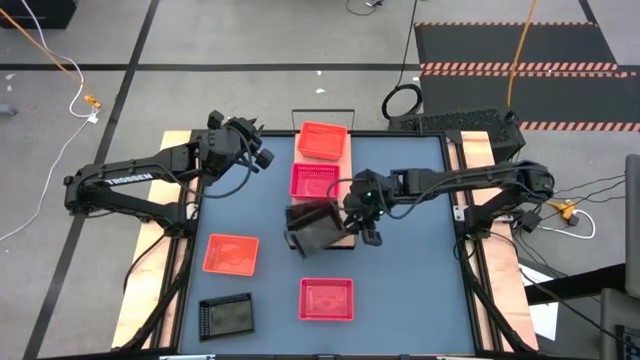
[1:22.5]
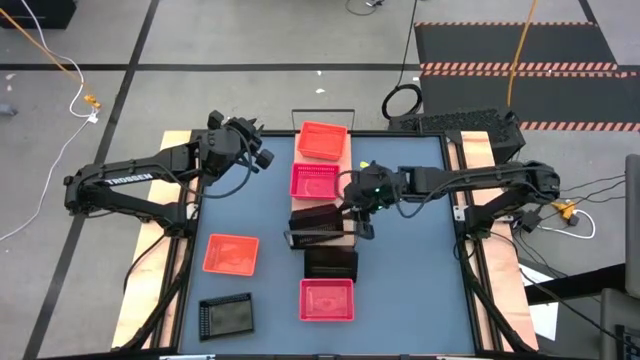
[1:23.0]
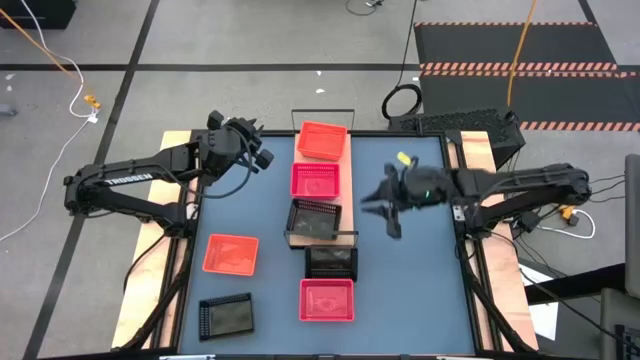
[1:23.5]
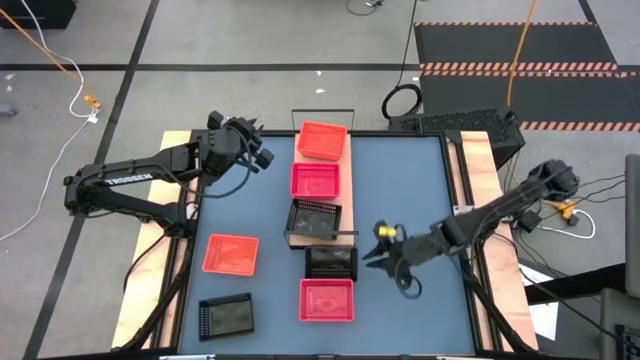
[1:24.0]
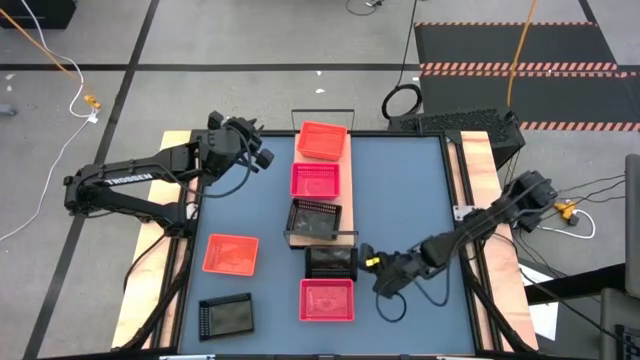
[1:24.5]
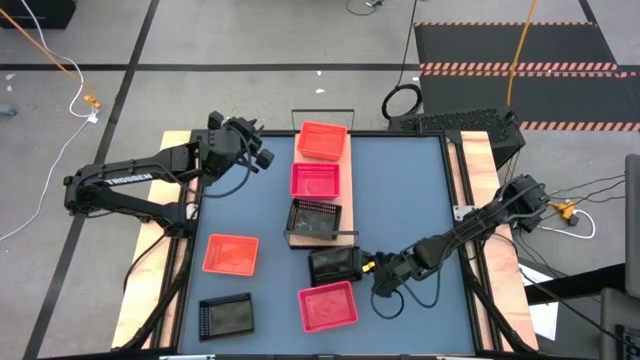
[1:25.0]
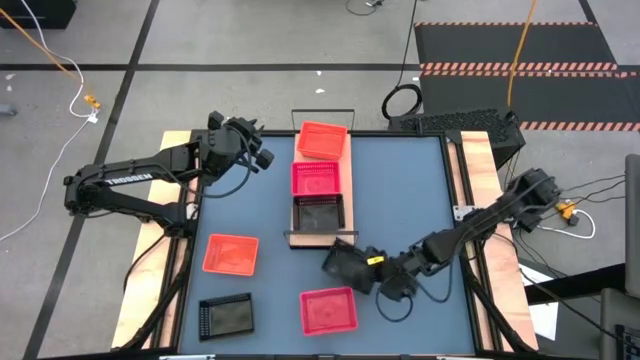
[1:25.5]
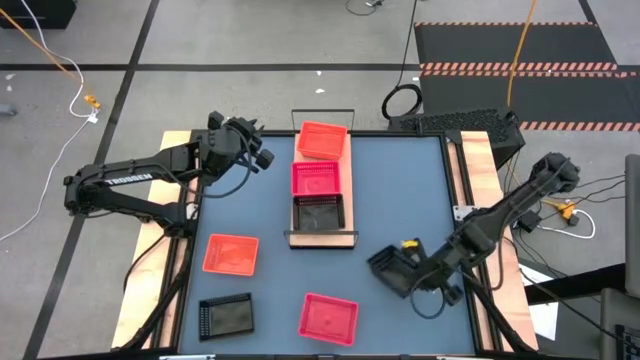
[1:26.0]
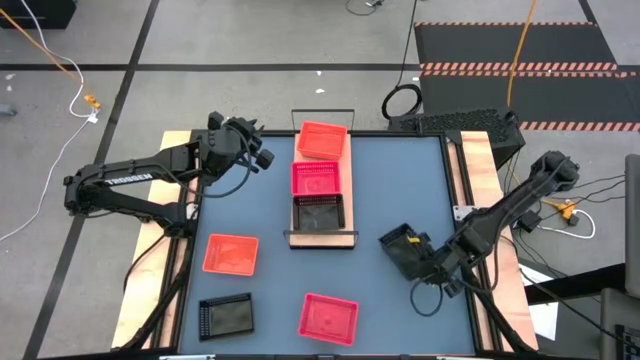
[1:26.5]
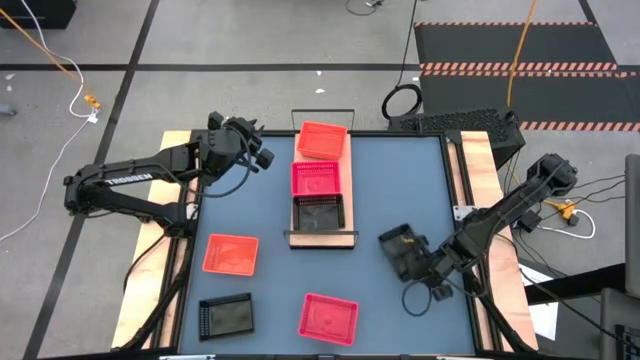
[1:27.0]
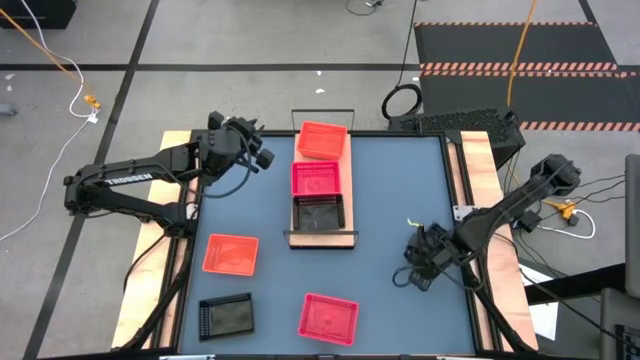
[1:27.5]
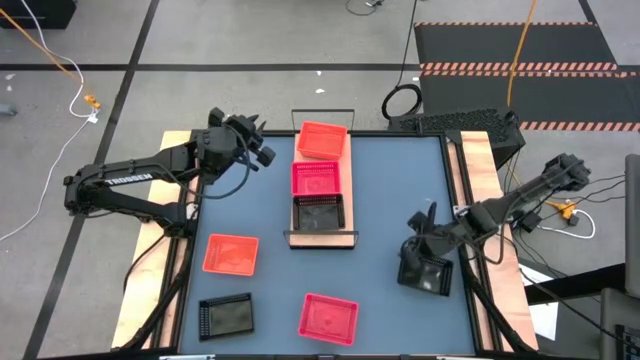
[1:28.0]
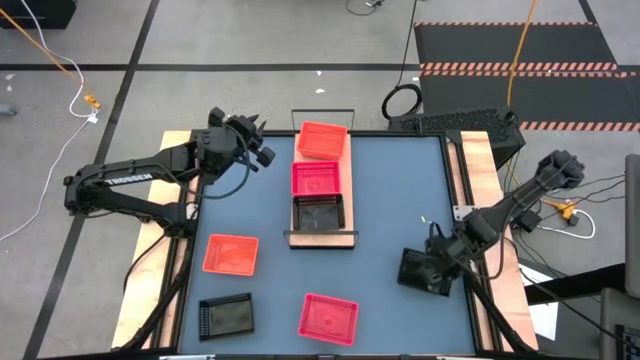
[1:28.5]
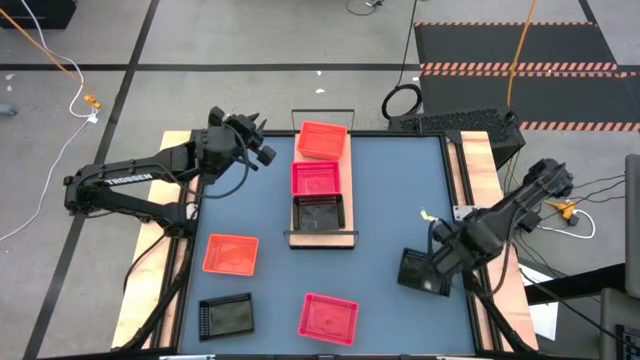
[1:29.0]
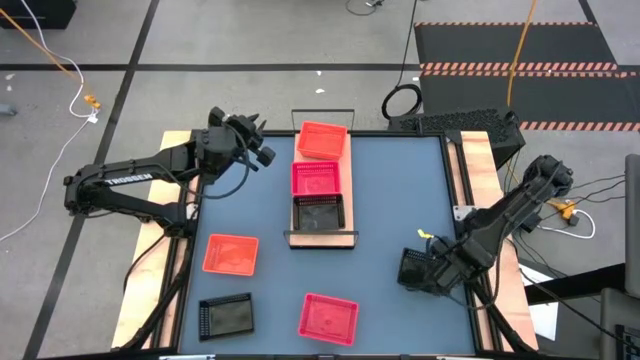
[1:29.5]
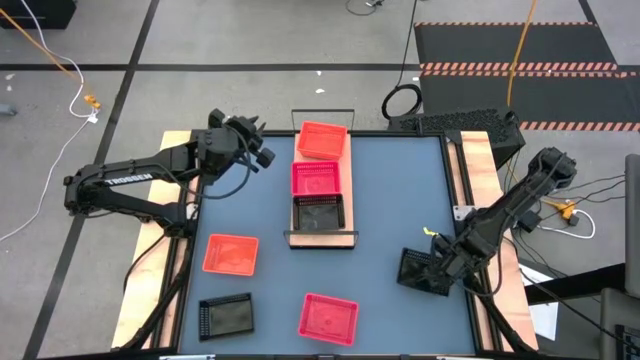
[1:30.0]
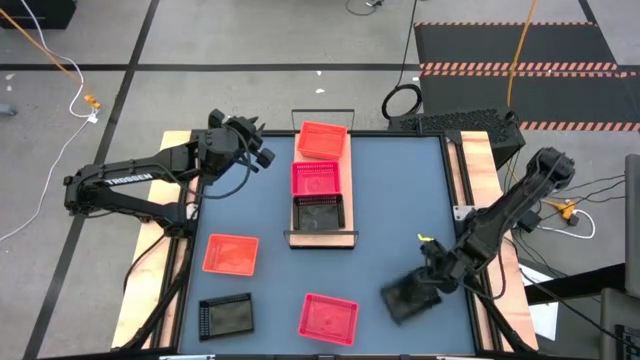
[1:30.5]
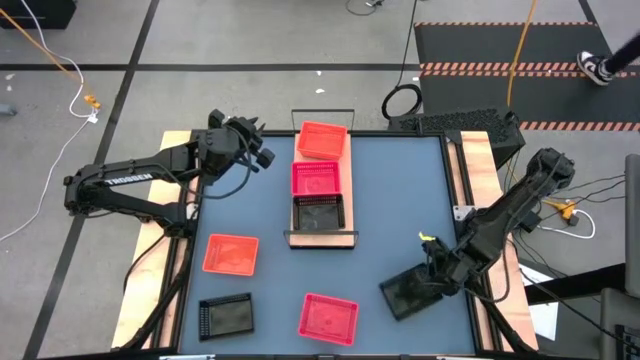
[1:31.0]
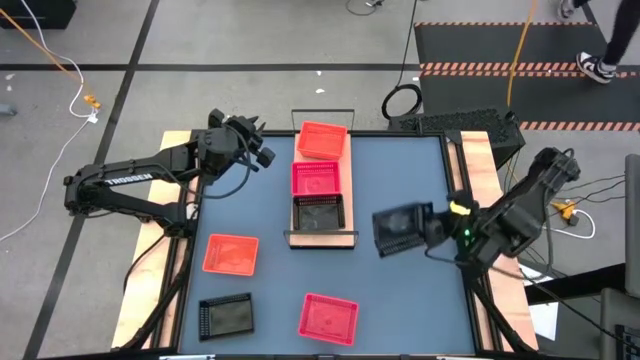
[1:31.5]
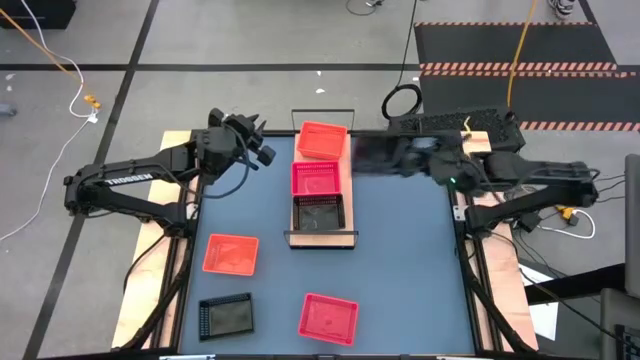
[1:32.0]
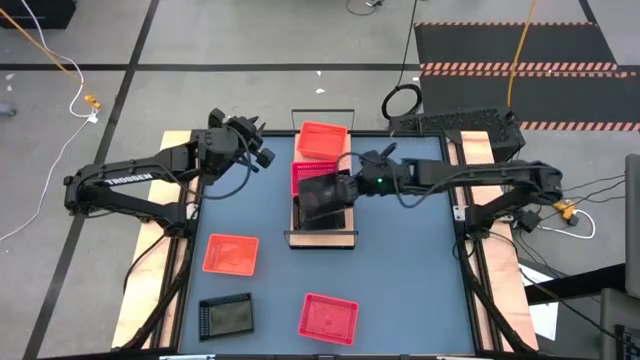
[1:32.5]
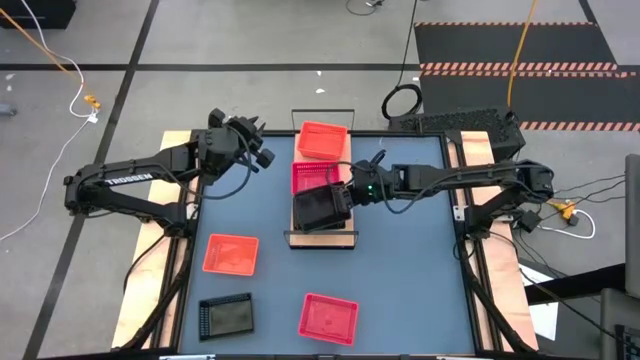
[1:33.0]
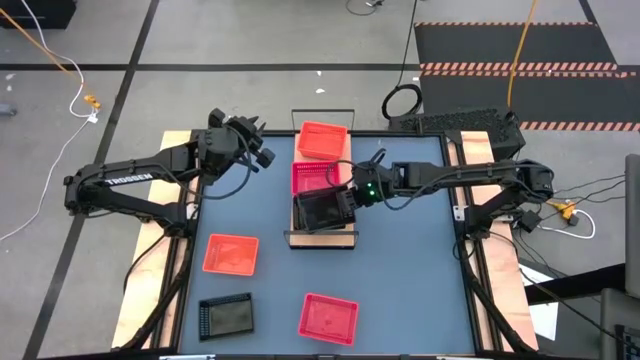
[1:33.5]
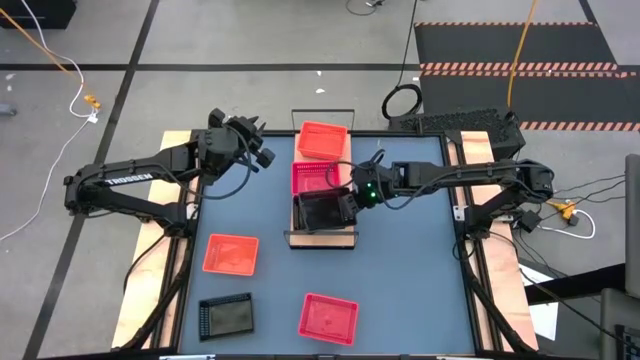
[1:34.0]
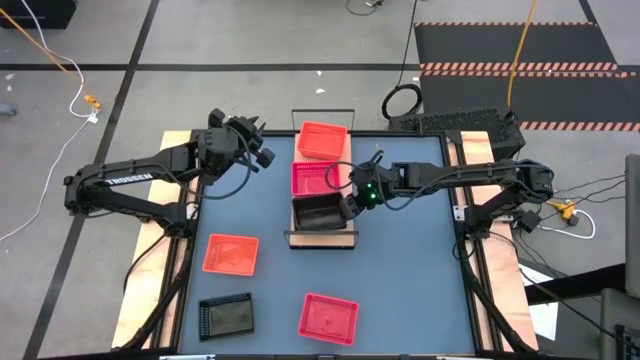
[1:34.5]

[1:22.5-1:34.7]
Task: Stack baskets on shelf by color
Stack the right black bin on the black bin on the shelf

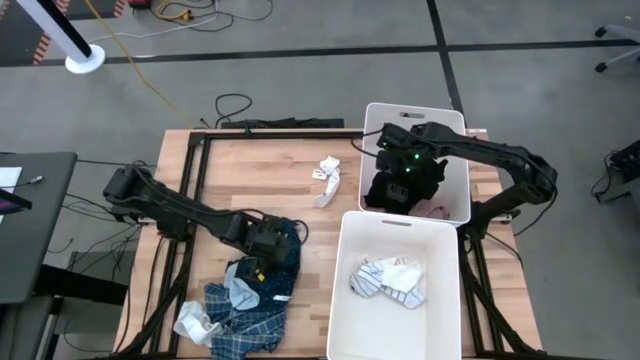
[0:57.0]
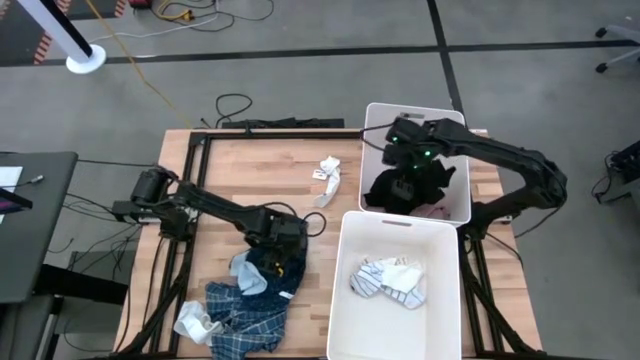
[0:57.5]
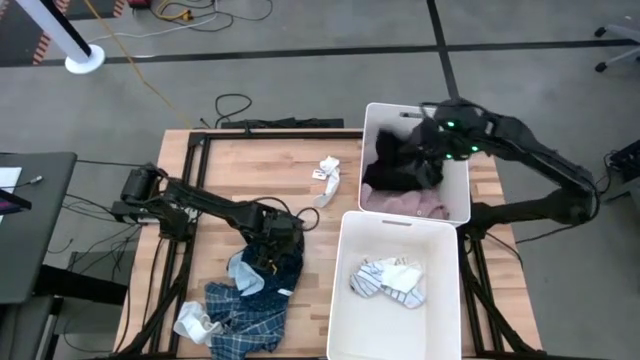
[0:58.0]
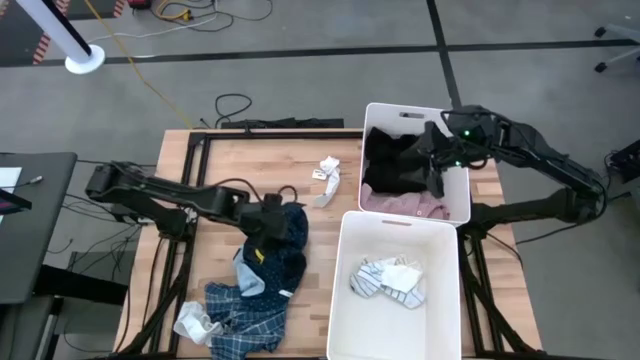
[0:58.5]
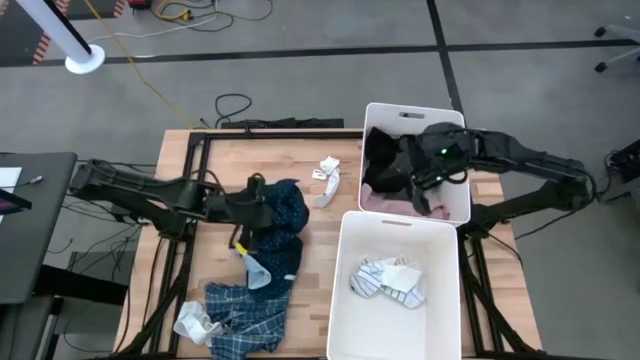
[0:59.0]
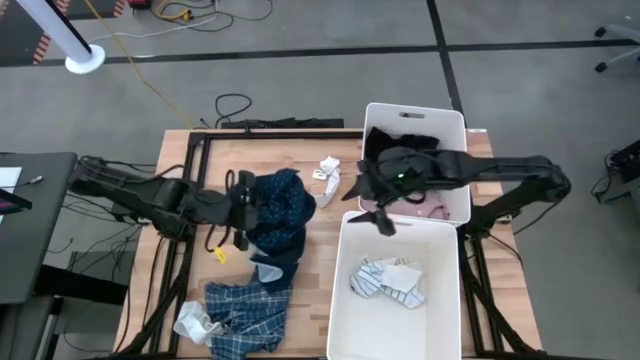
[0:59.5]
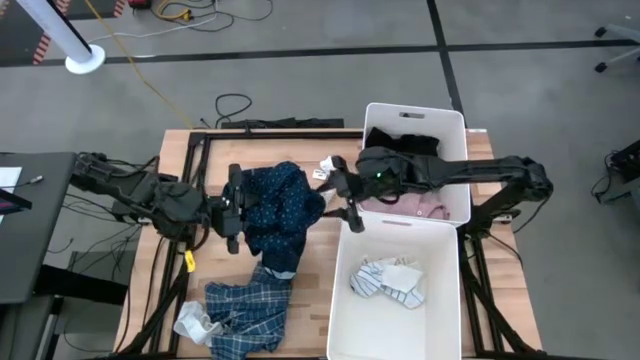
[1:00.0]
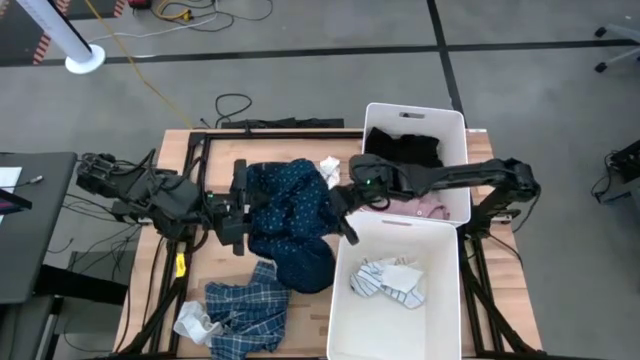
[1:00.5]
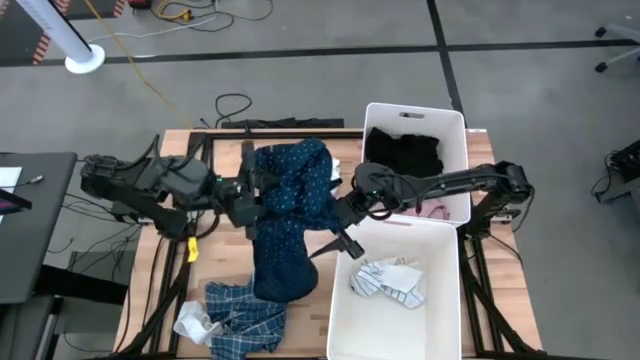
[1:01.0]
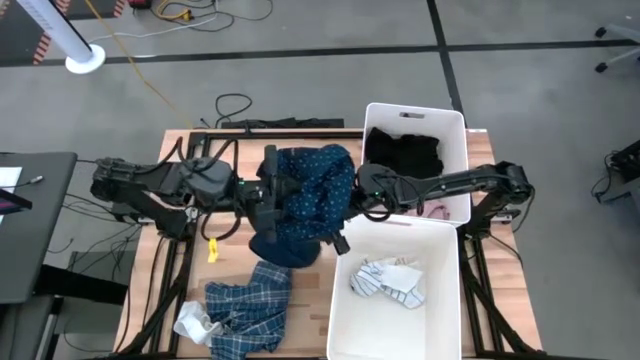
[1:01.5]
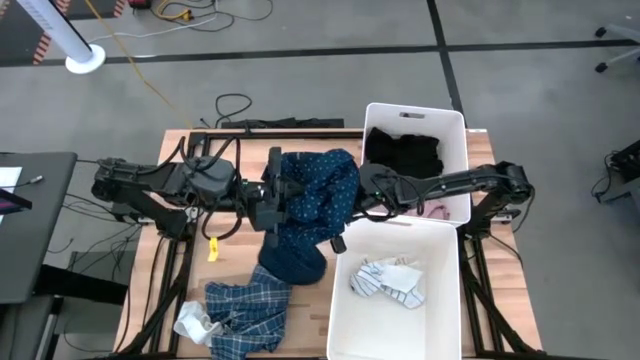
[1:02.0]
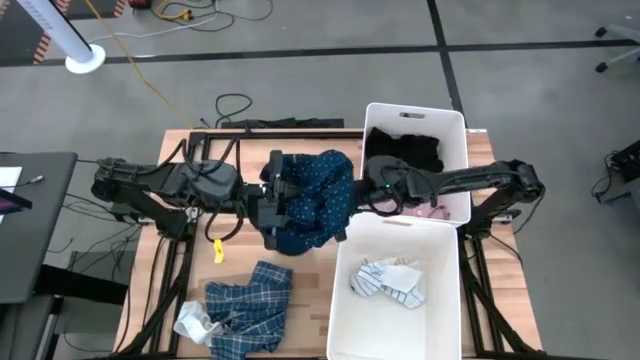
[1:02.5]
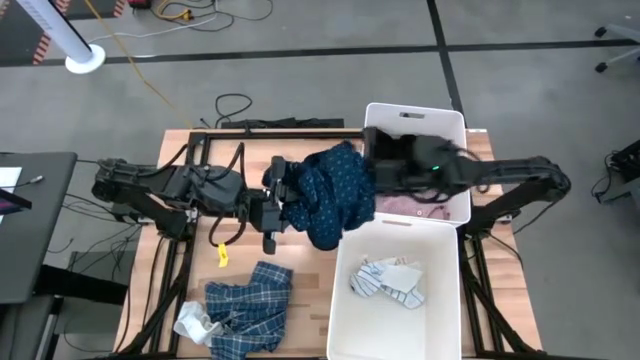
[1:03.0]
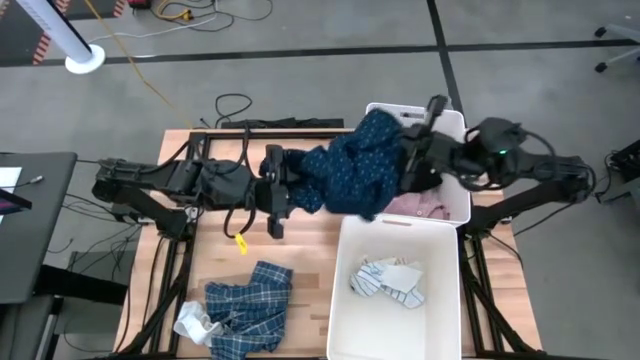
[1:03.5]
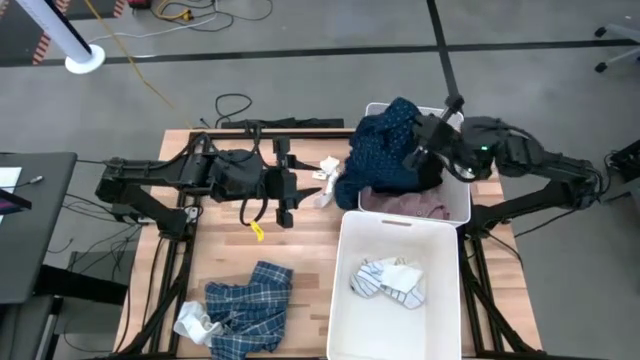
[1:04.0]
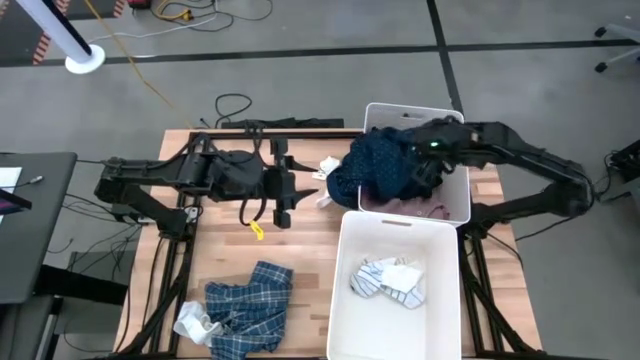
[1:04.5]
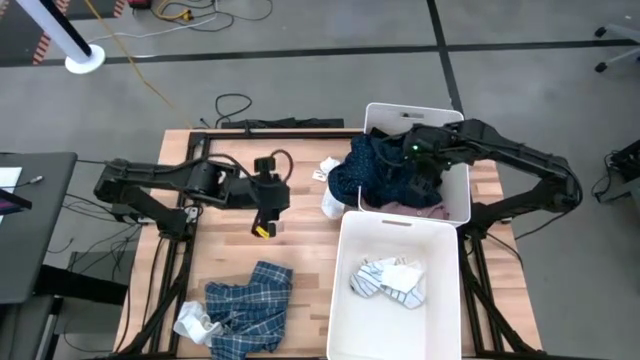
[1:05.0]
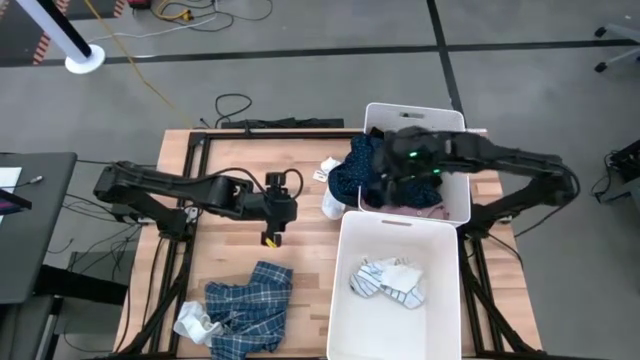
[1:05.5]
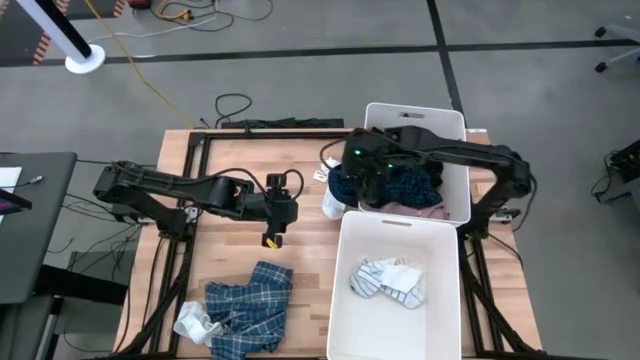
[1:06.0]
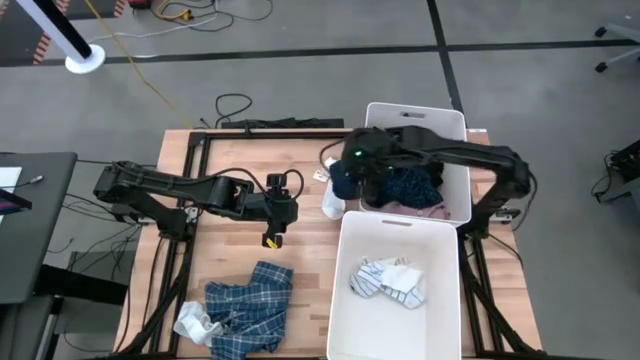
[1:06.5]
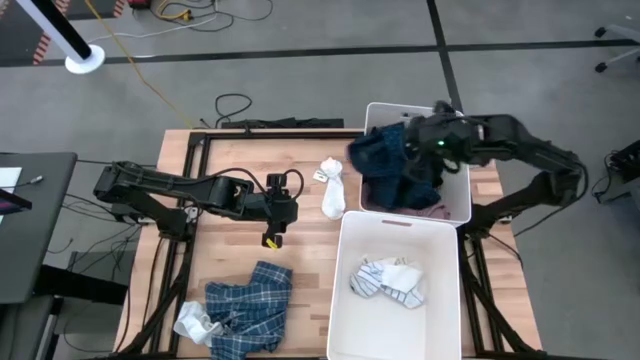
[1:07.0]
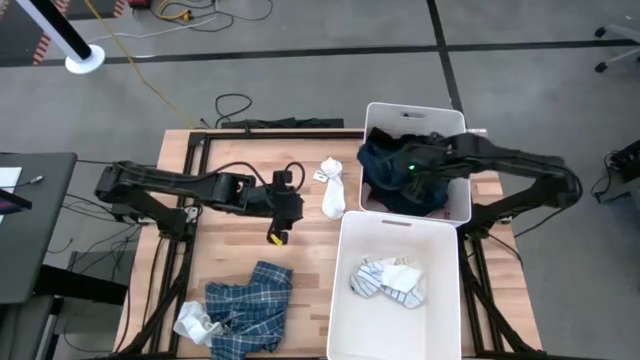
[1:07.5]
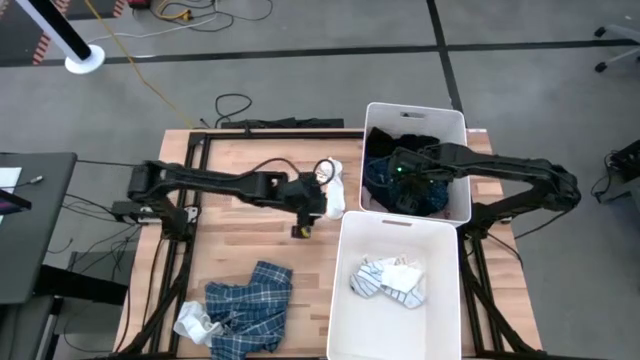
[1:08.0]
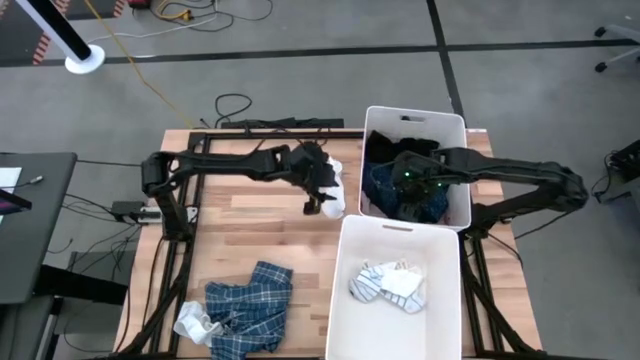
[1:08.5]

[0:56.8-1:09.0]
Task: Sort clothes
Put the top blue patterned polo into the top laundry bin
